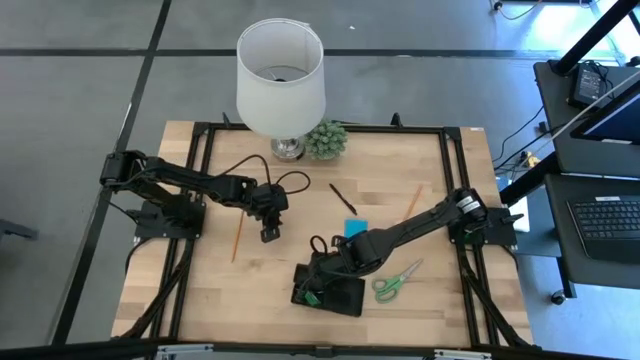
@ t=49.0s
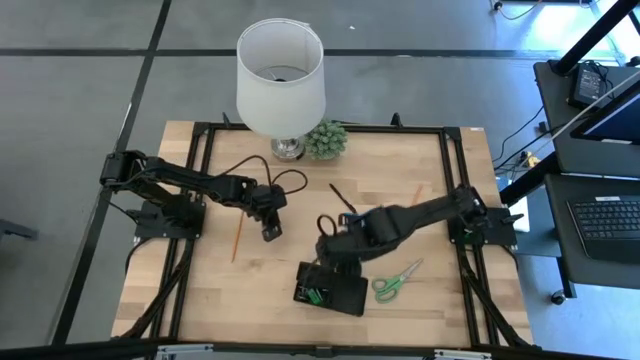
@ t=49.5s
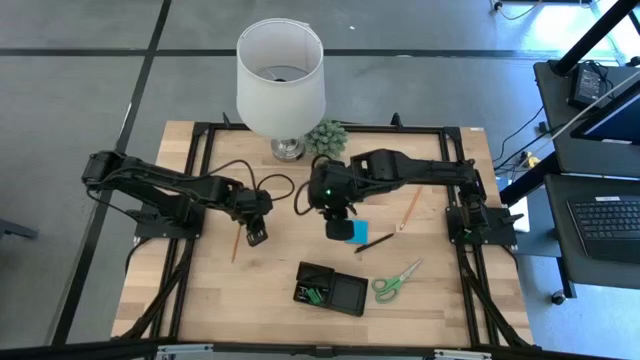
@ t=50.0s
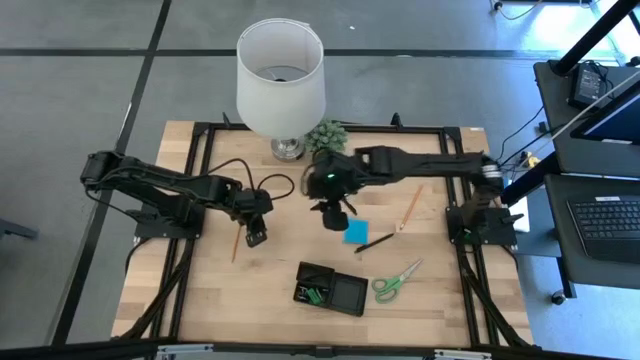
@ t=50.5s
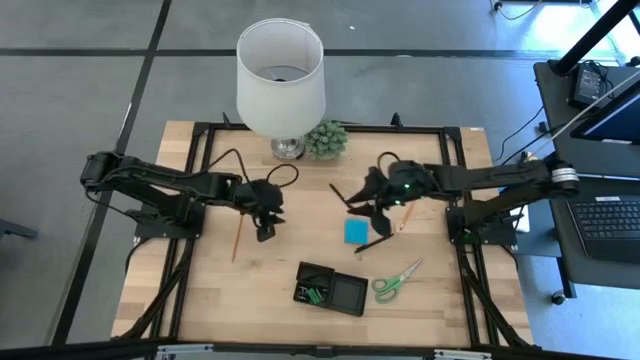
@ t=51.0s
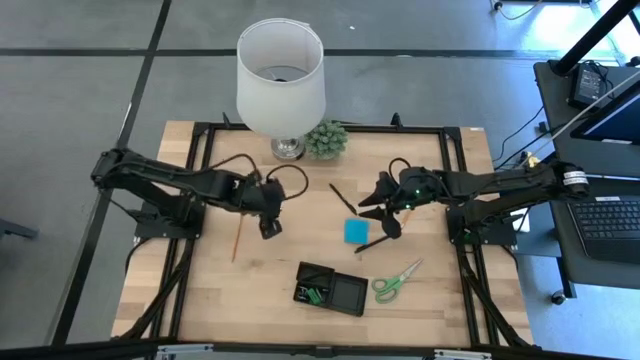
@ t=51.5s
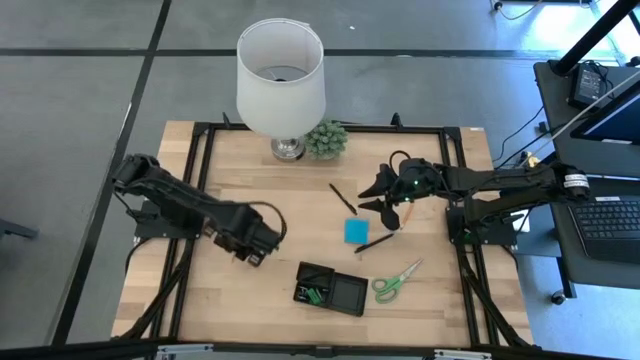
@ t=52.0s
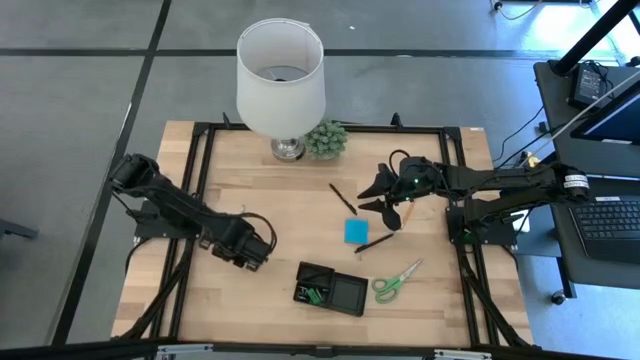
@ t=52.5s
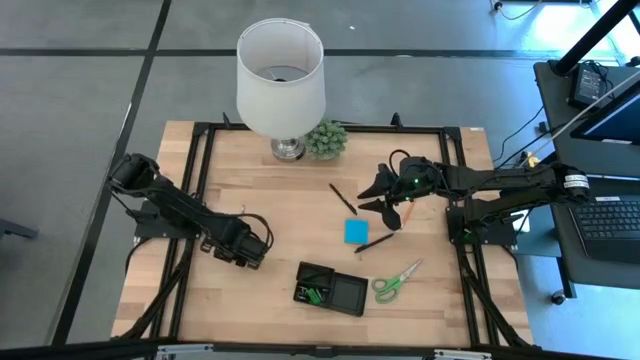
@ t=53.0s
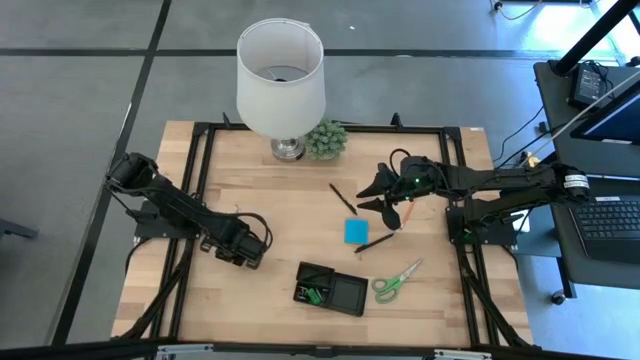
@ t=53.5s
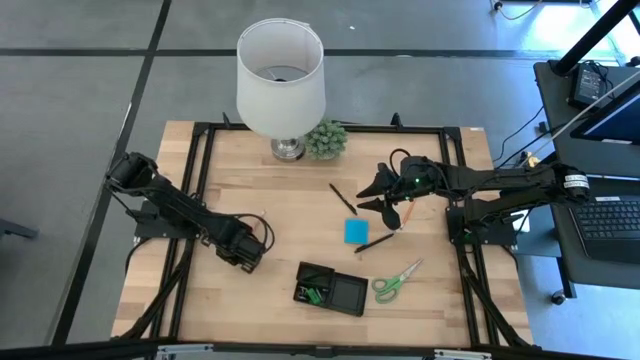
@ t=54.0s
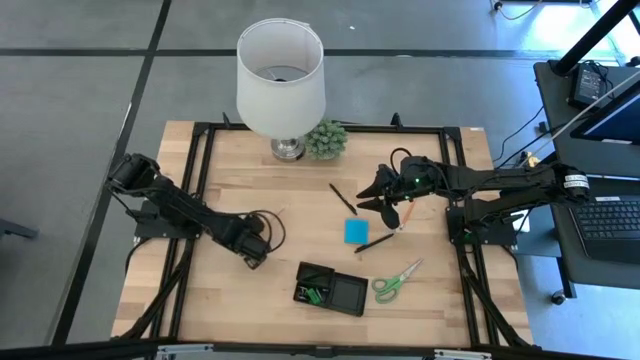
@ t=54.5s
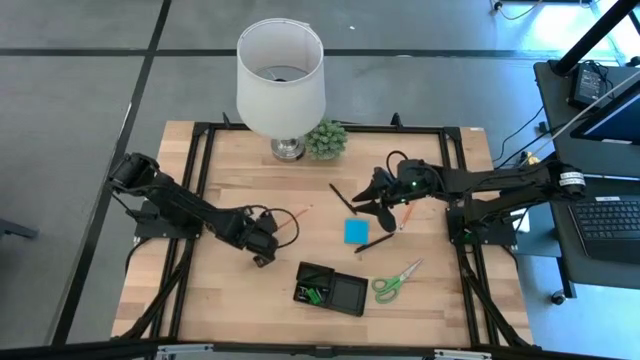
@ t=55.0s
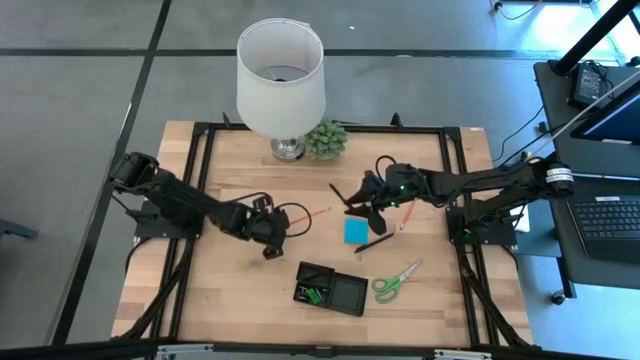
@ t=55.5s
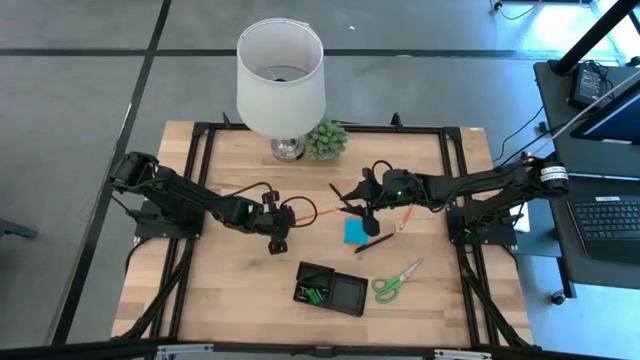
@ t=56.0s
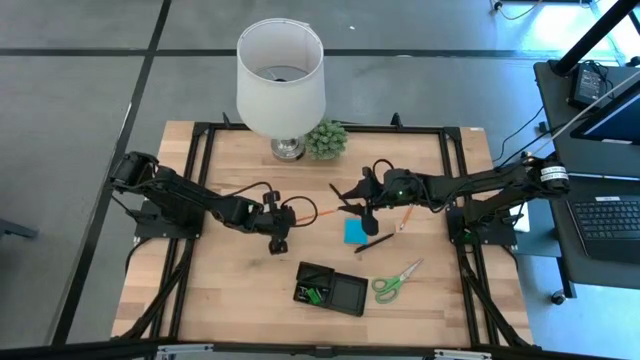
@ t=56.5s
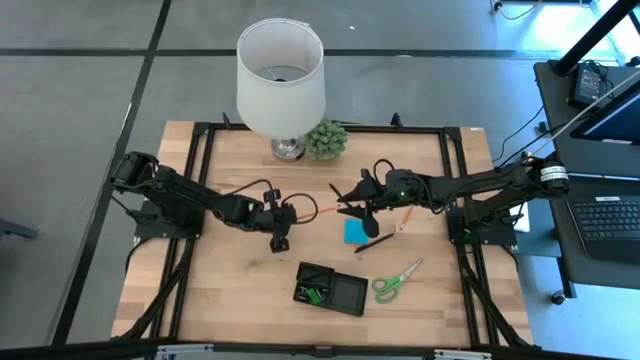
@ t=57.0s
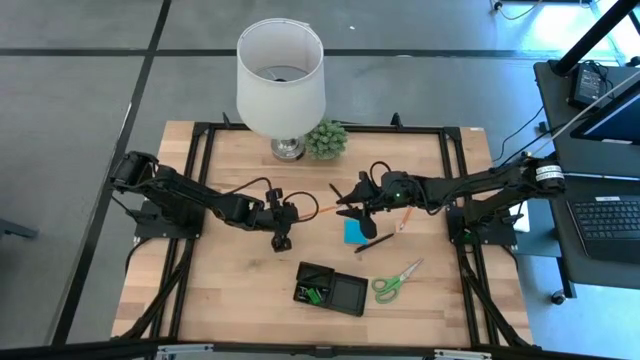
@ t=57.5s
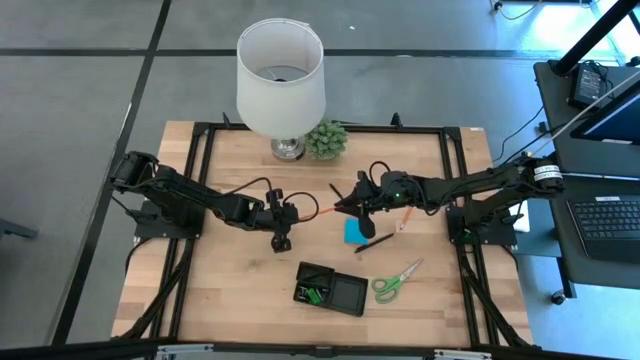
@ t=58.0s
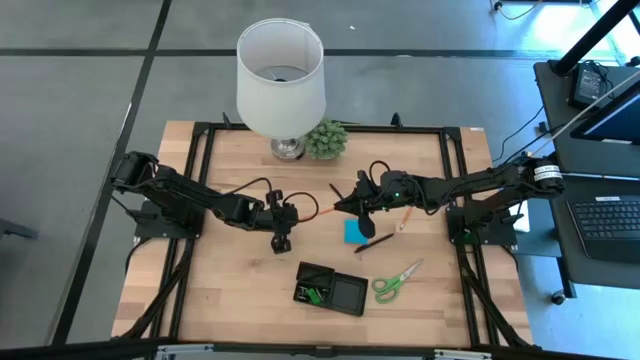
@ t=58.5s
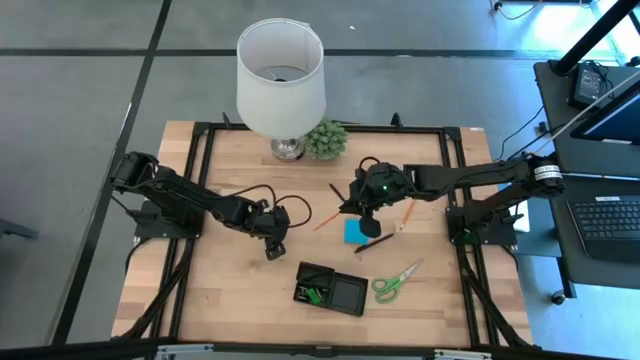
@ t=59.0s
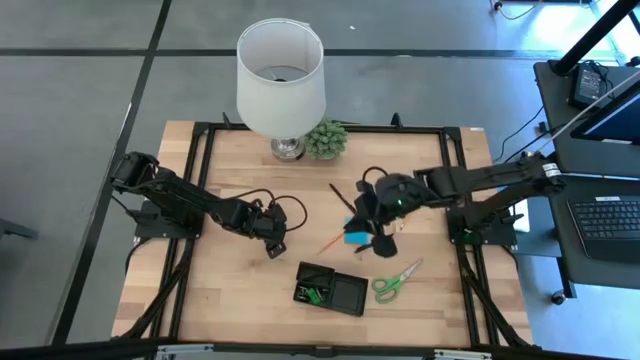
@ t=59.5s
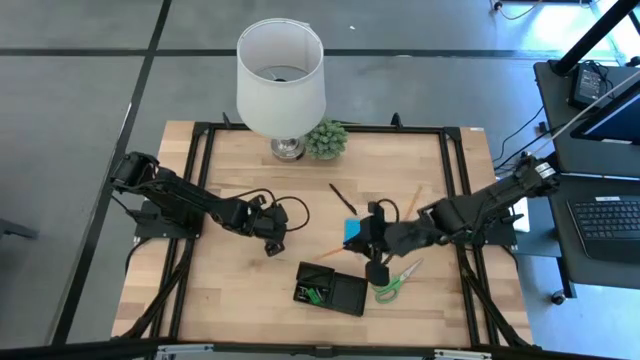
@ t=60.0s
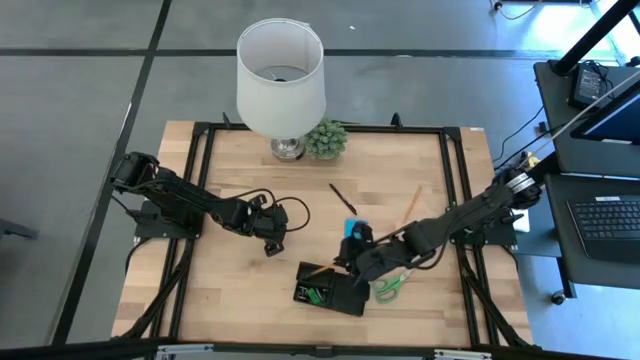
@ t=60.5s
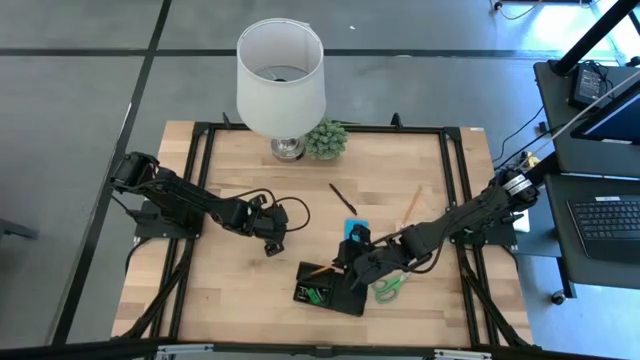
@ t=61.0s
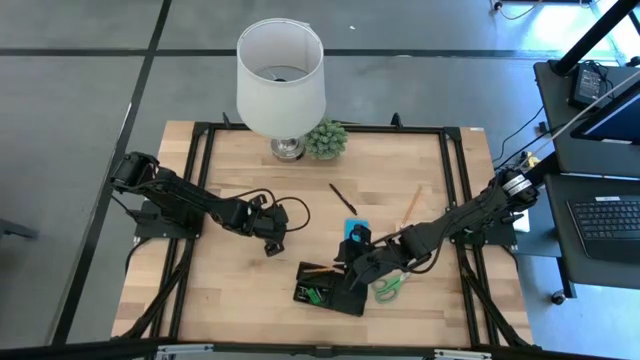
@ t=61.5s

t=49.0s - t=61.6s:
Task: Pick and place office supplies into organizer
Put the left orange pencil into the desk organizer

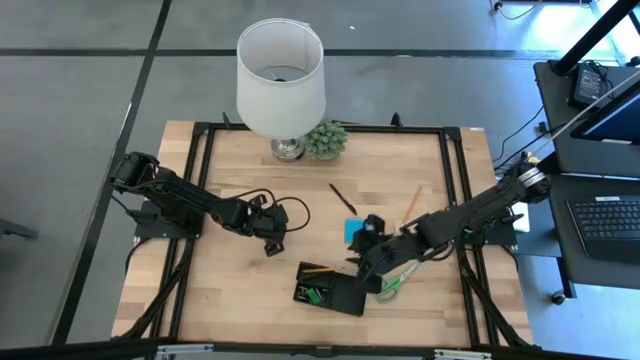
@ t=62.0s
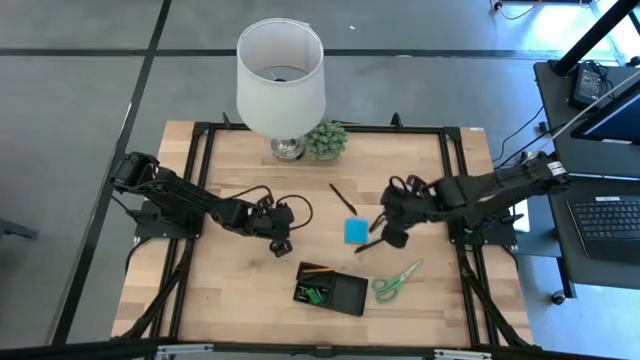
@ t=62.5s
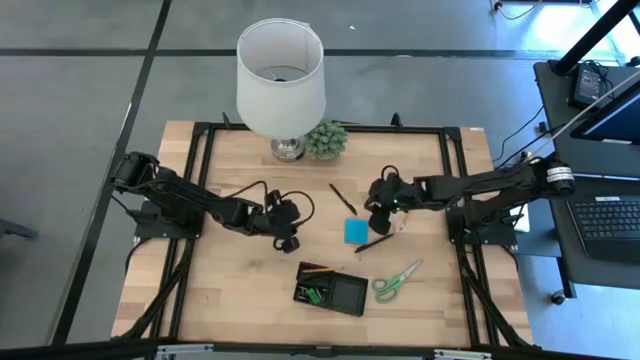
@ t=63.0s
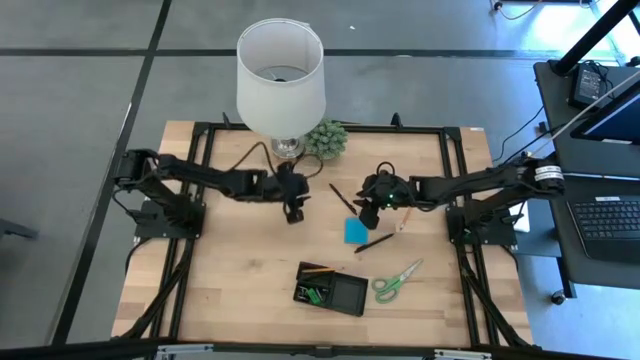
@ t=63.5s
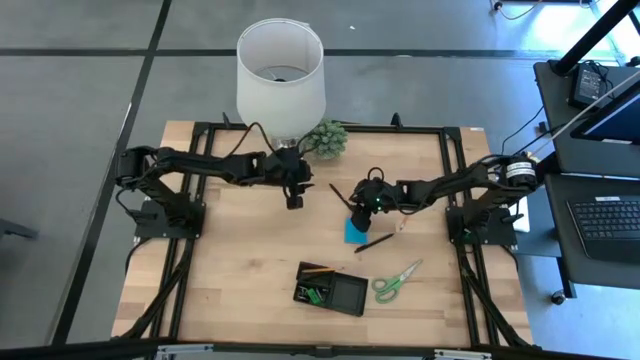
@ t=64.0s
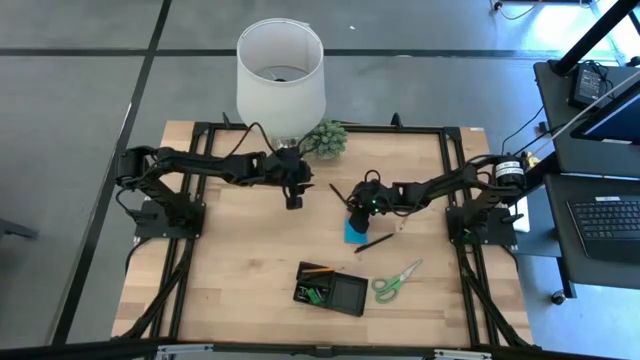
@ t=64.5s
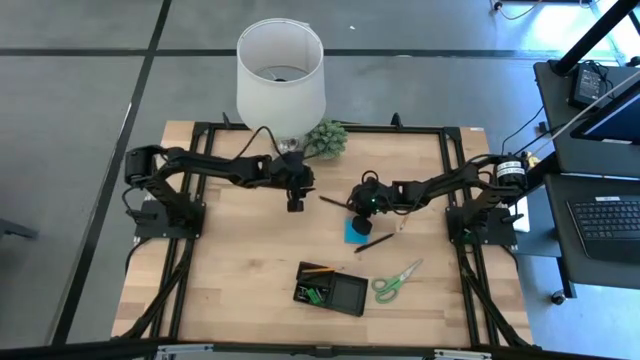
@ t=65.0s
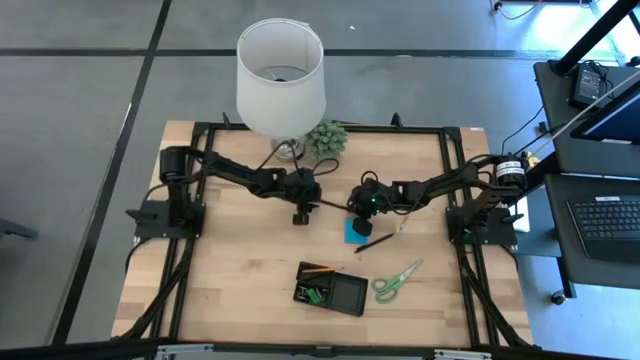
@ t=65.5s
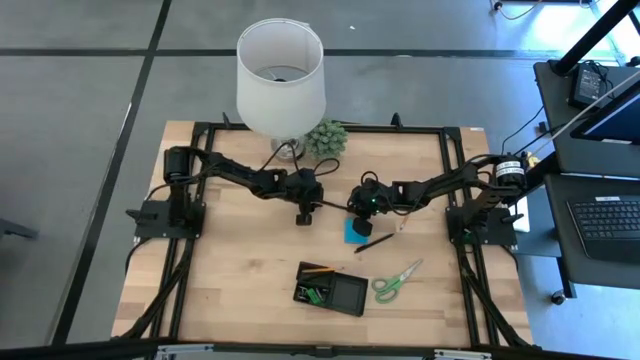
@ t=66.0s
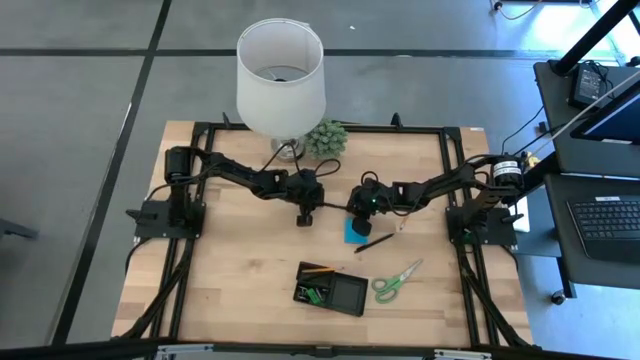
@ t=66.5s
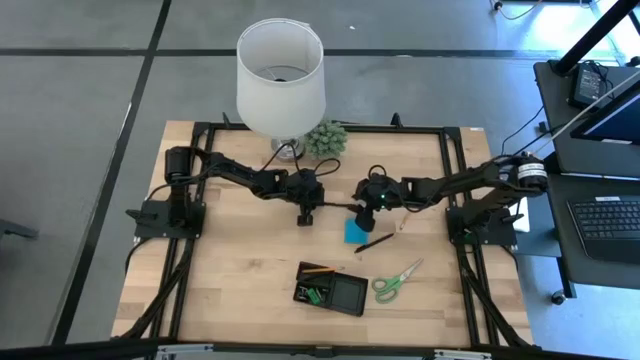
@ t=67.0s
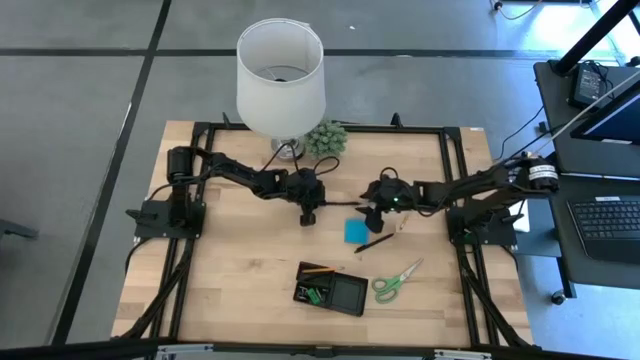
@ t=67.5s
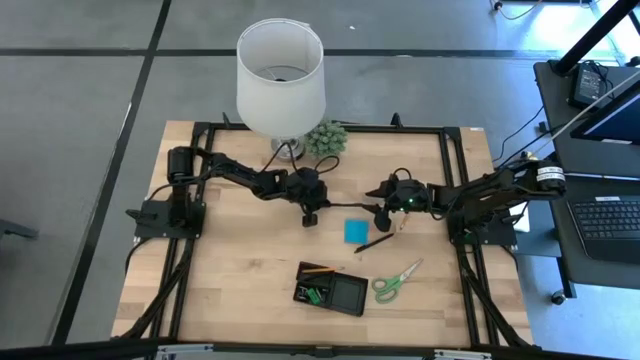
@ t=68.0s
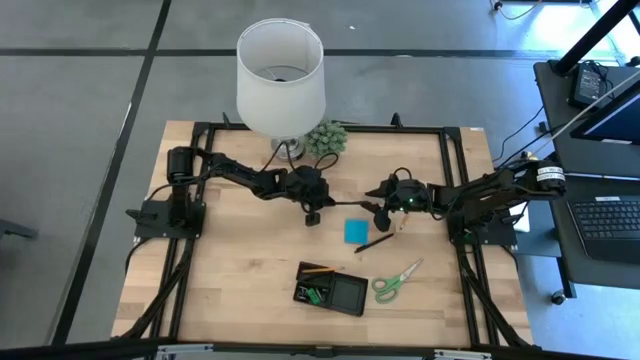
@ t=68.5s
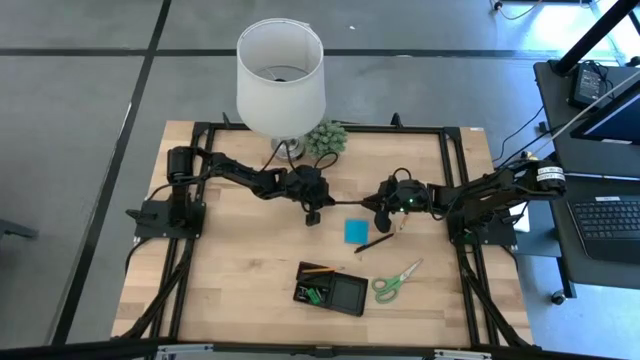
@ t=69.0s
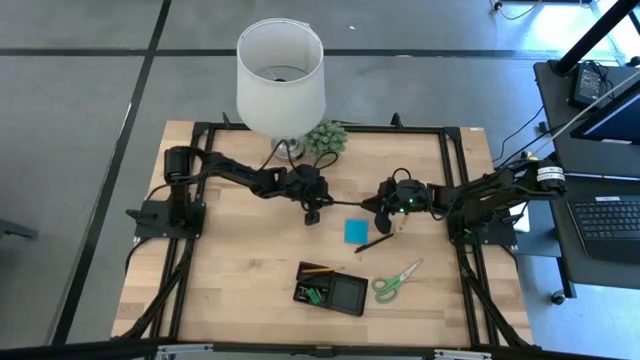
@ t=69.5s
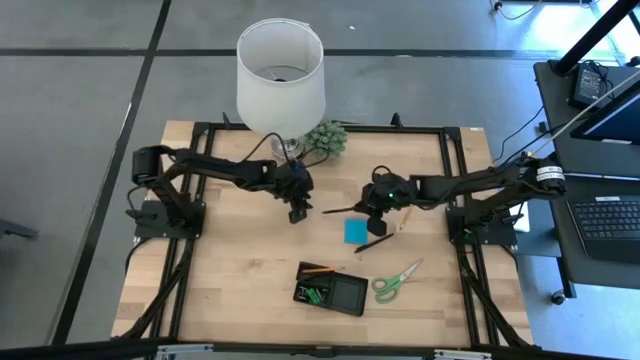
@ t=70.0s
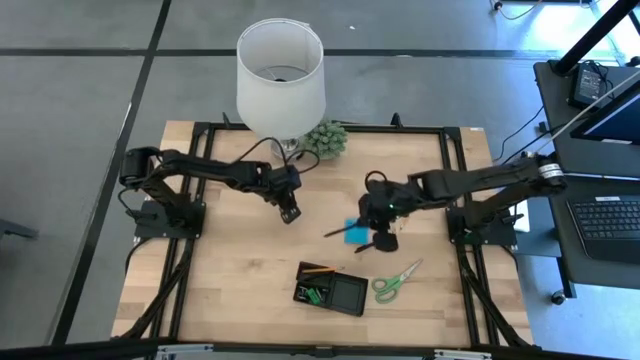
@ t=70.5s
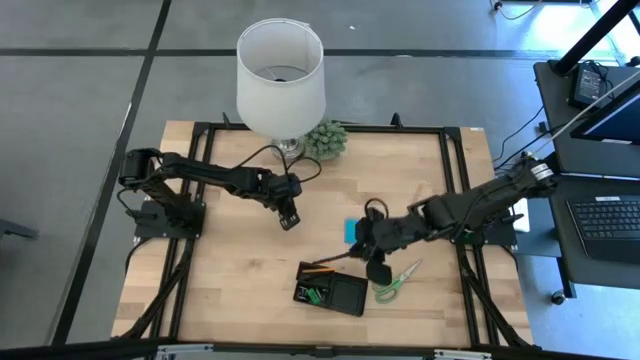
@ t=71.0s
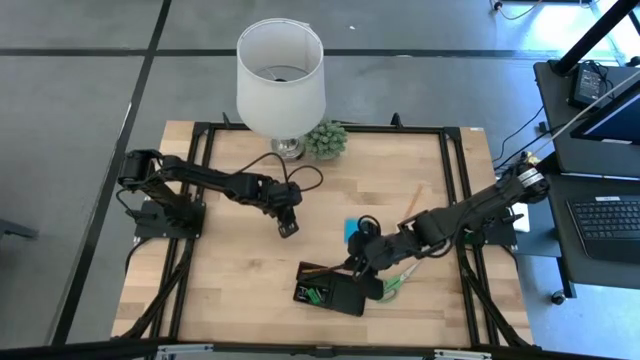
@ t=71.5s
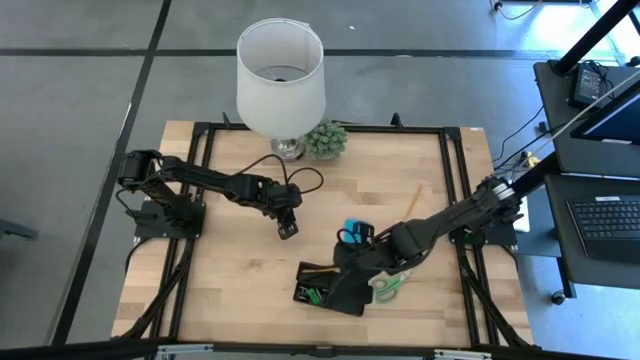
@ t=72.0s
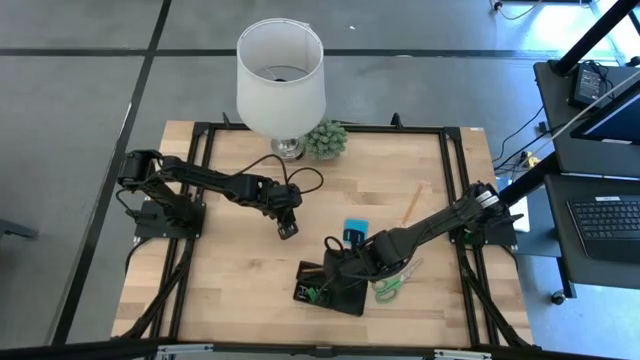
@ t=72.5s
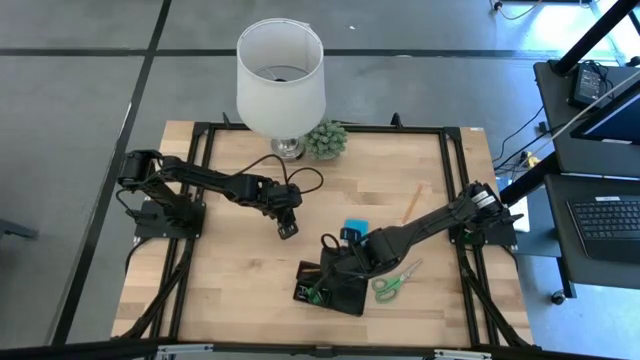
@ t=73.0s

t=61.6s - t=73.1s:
Put the top black pen into the desk organizer
